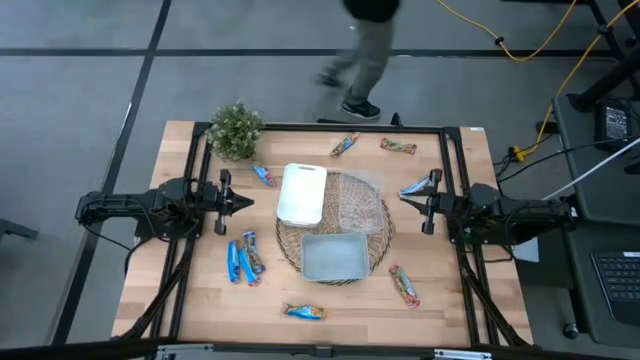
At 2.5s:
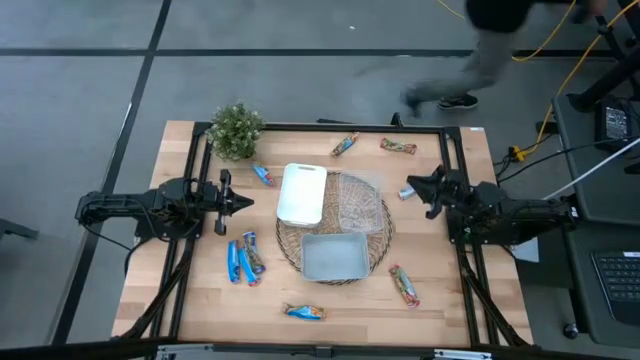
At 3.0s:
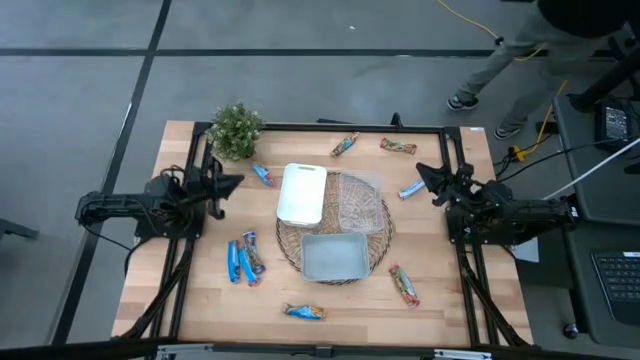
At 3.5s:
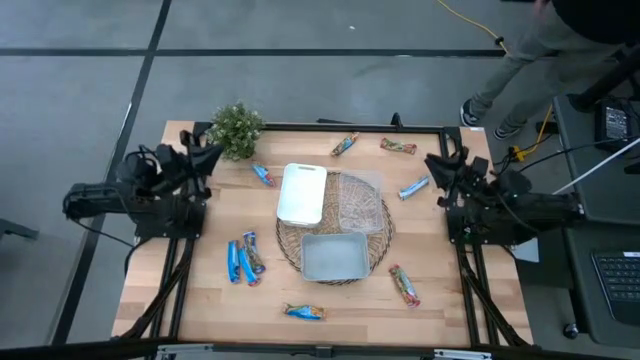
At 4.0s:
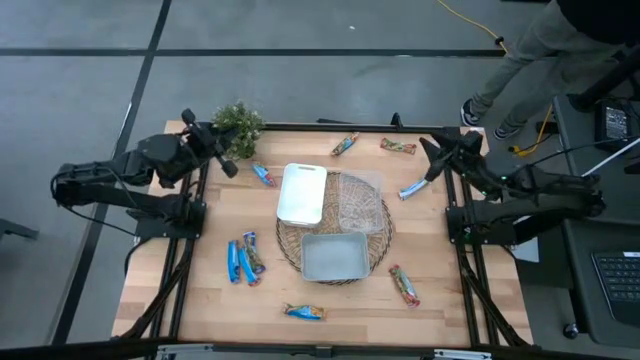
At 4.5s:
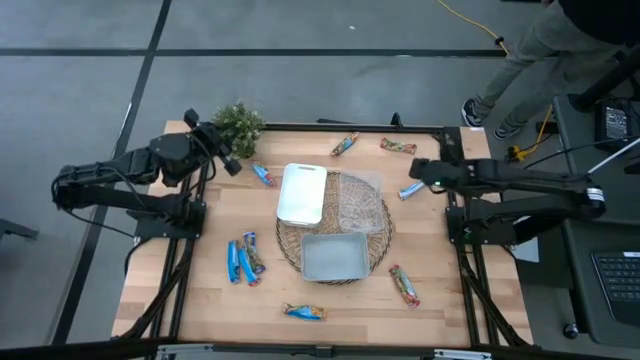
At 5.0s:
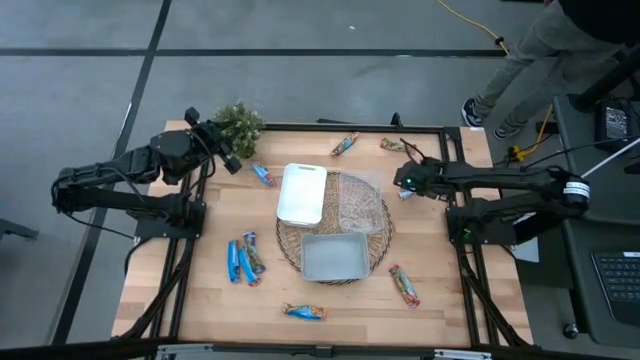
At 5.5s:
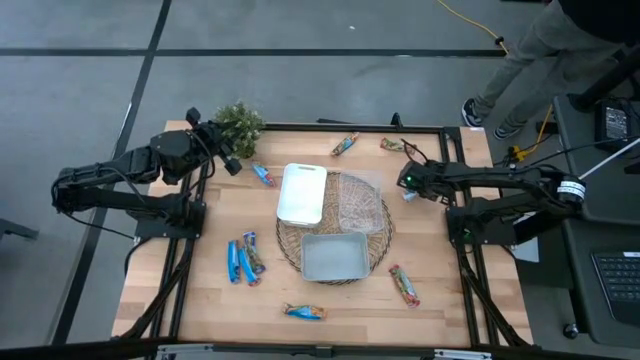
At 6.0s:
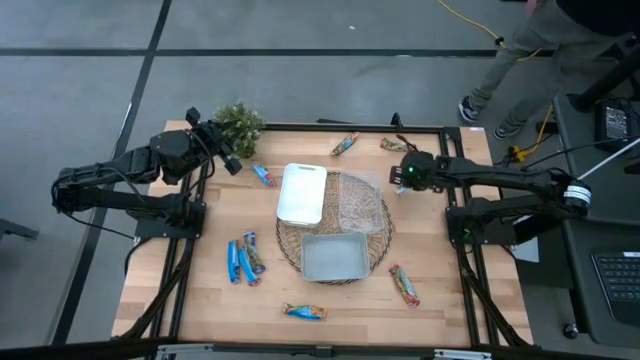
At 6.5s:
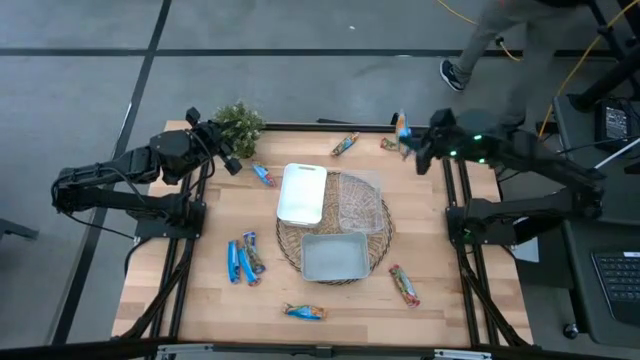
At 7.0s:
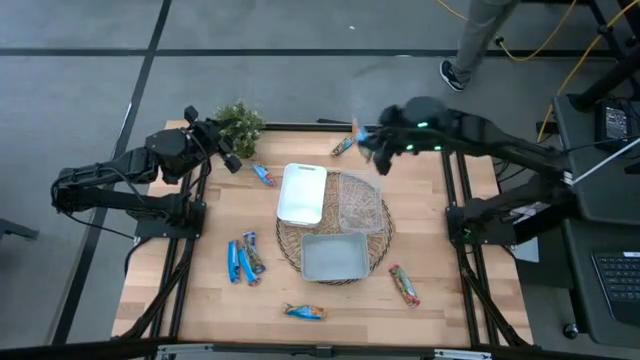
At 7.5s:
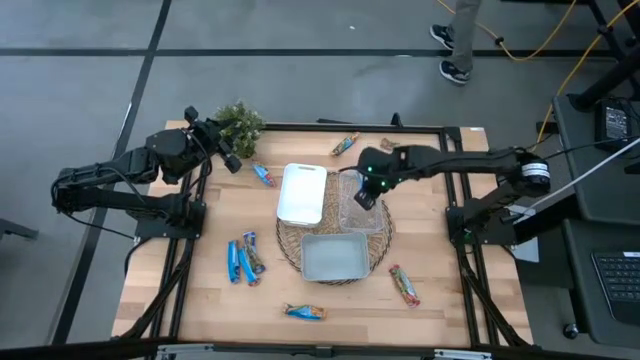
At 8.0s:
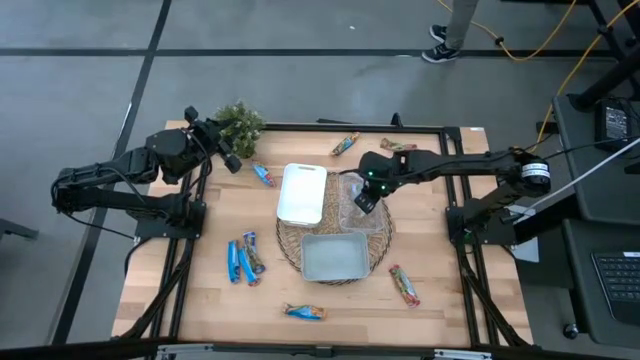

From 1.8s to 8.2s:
Task: Pick and place Granola Bars by type
Put the middle right yellow granola bar into the transparent bin

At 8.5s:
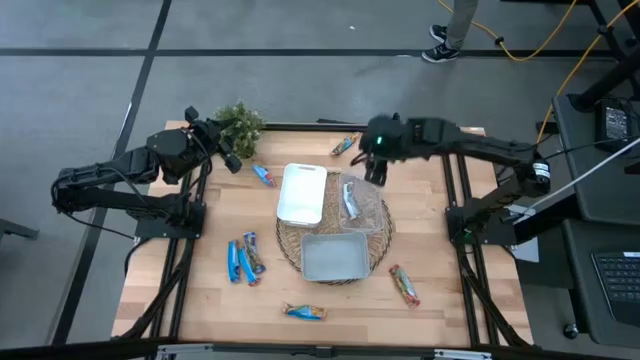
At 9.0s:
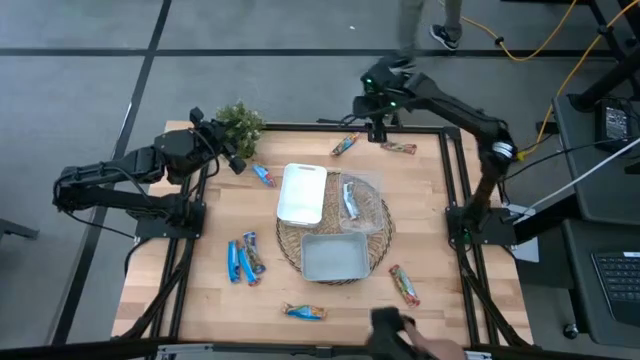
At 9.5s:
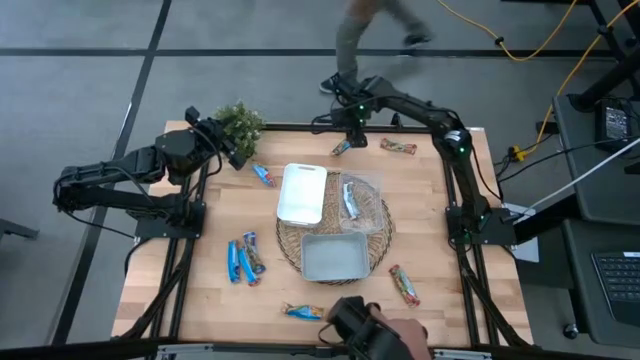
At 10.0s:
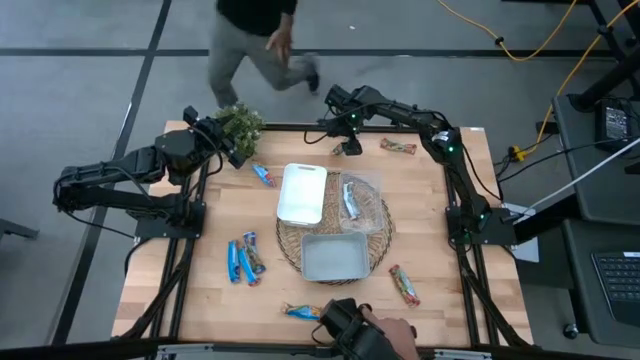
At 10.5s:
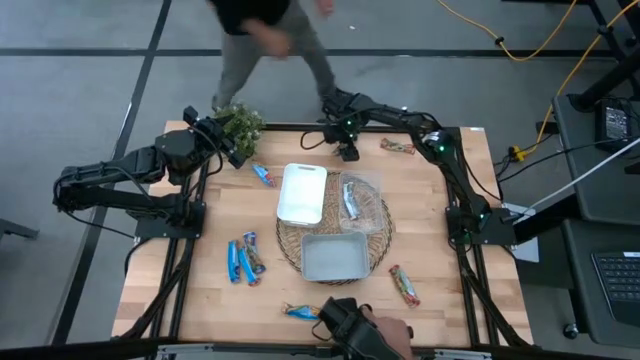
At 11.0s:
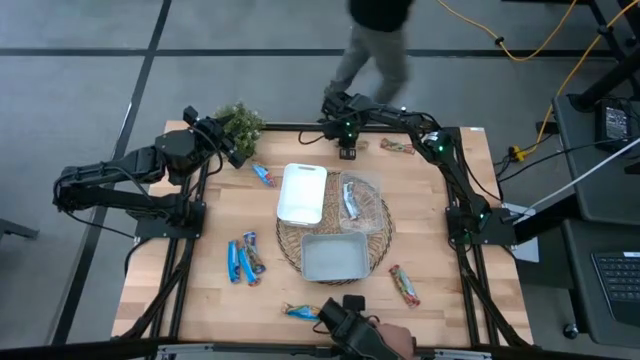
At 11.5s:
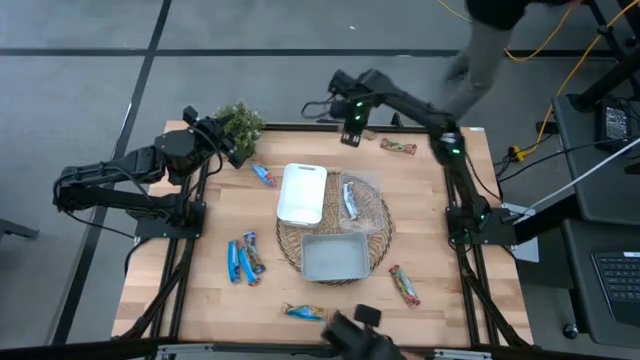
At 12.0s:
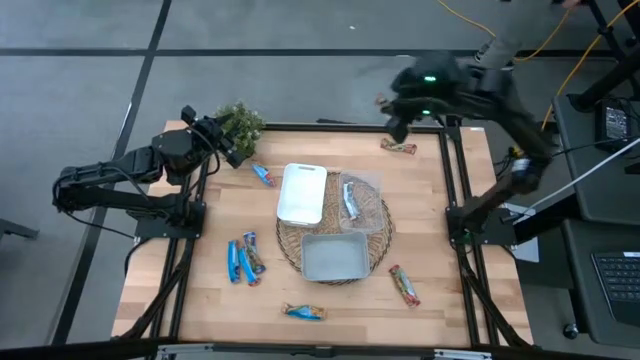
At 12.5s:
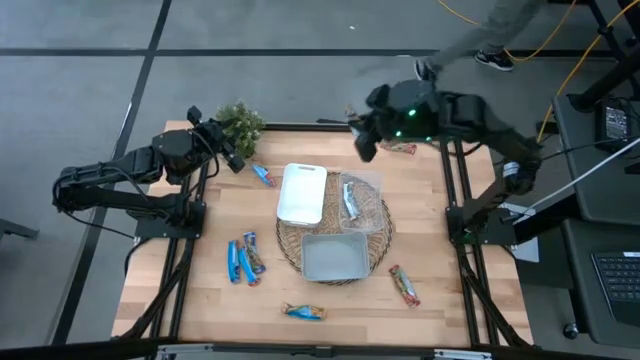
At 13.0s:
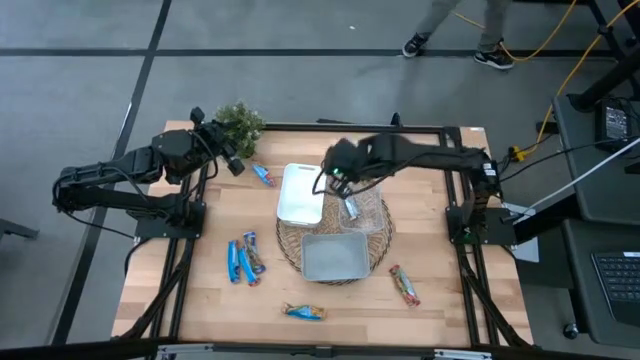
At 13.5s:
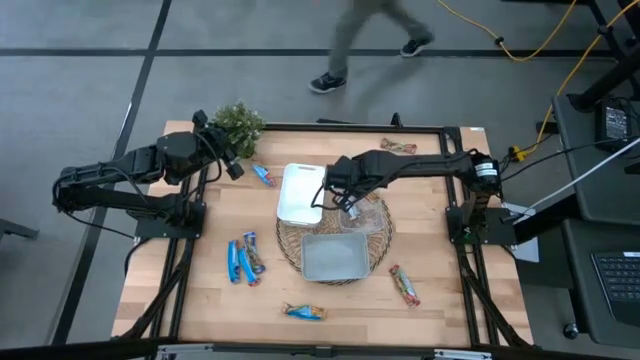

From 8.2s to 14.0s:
Put the top yellow granola bar into the transparent bin

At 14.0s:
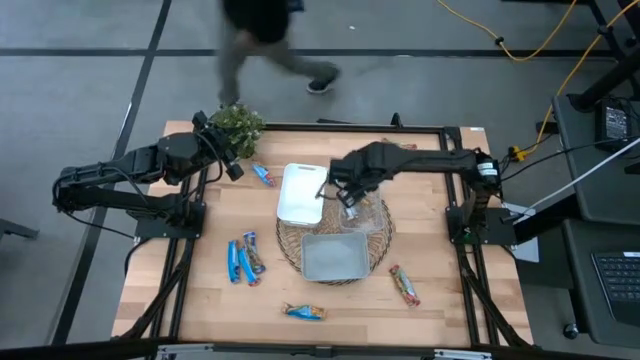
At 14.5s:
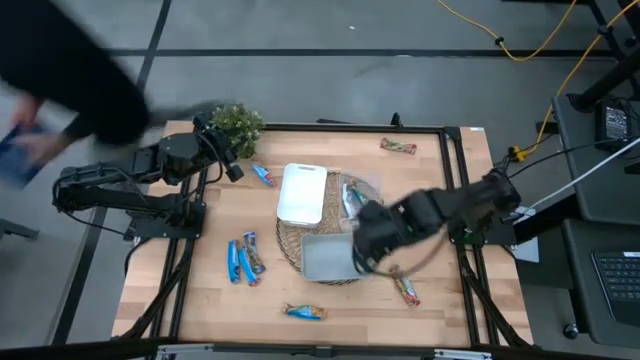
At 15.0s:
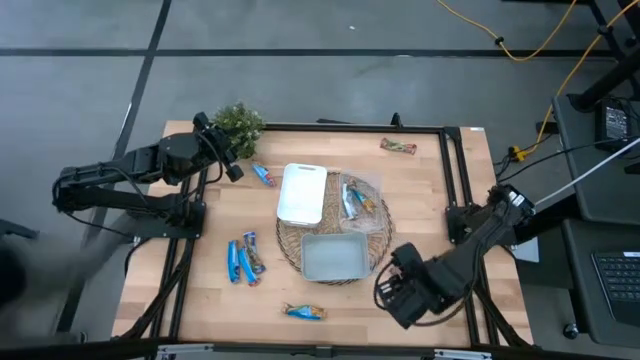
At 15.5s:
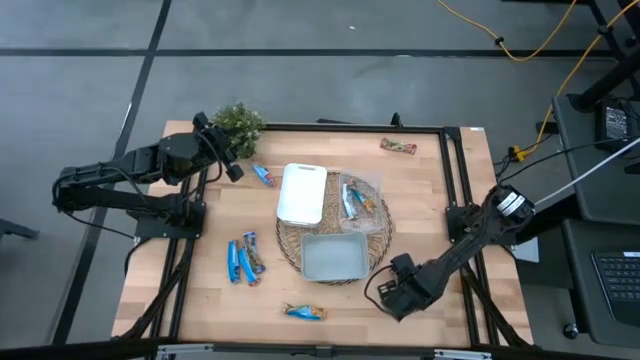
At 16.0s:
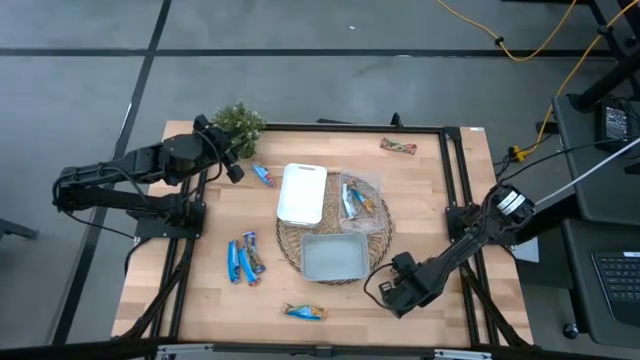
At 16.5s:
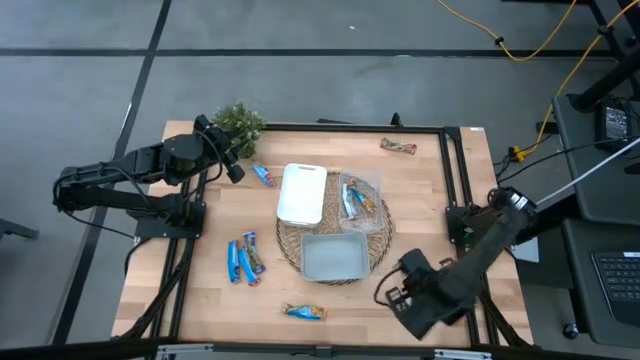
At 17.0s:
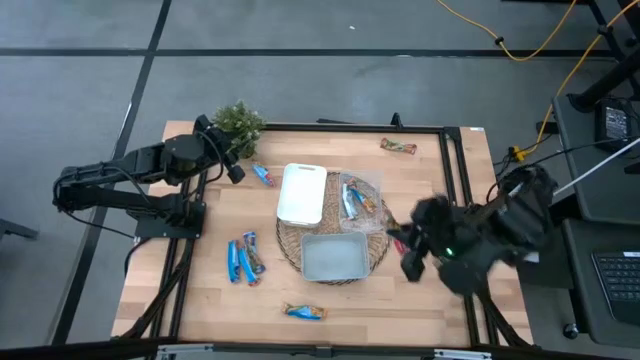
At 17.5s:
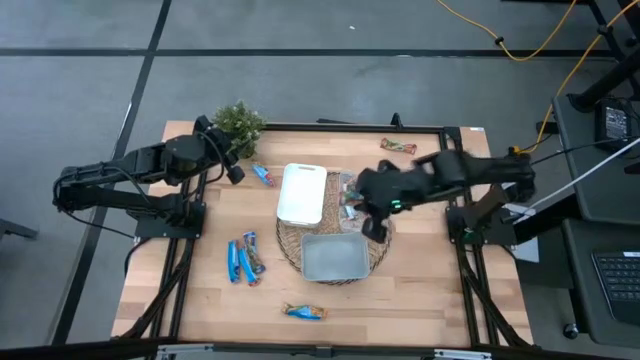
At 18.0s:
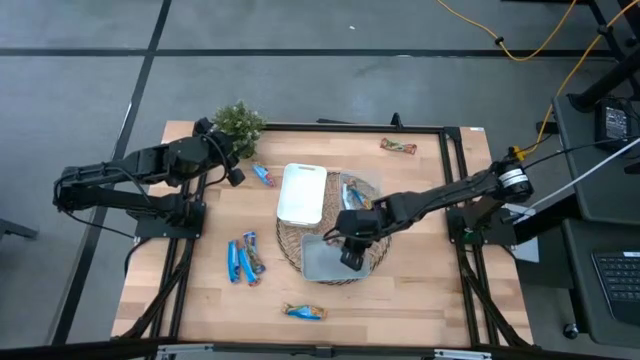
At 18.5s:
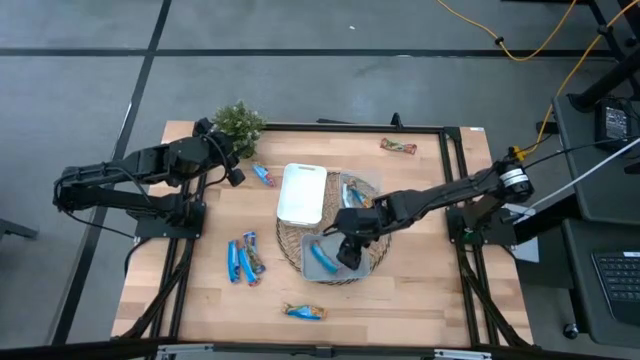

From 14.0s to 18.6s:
Put the bottom right red granola bar into the gray bin

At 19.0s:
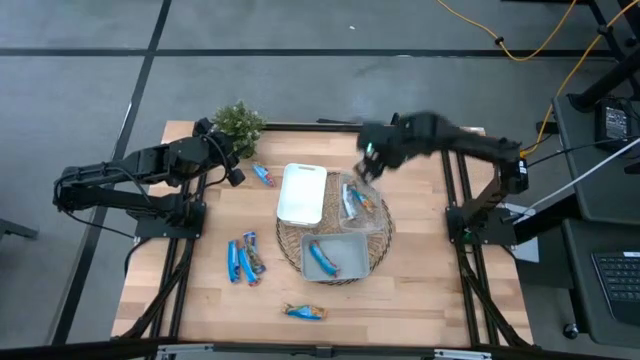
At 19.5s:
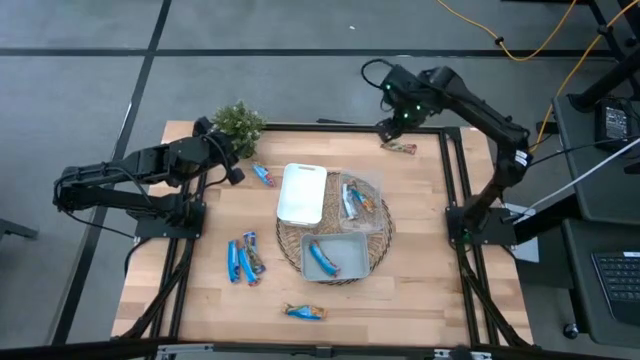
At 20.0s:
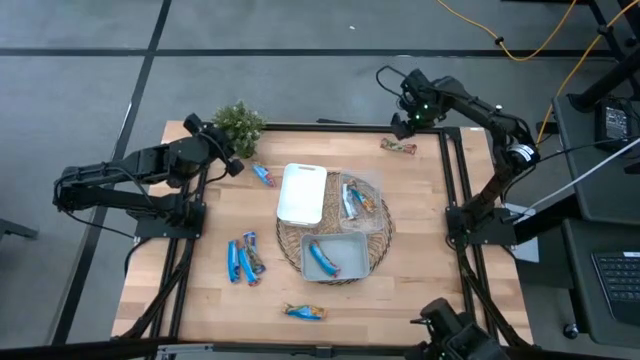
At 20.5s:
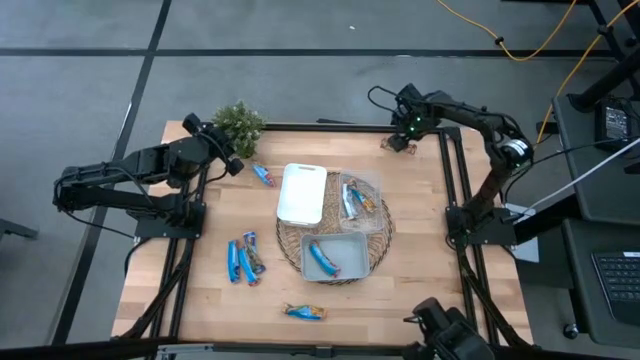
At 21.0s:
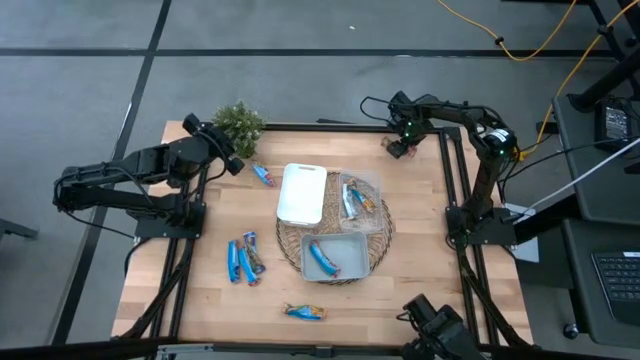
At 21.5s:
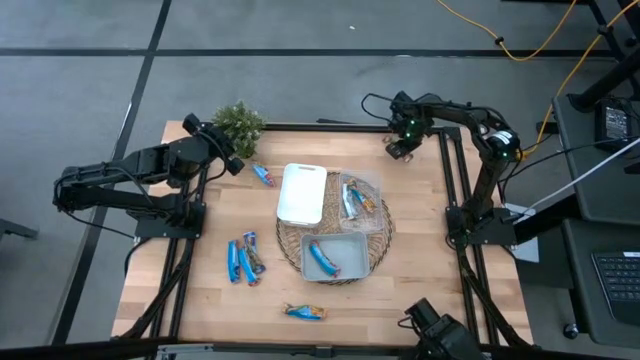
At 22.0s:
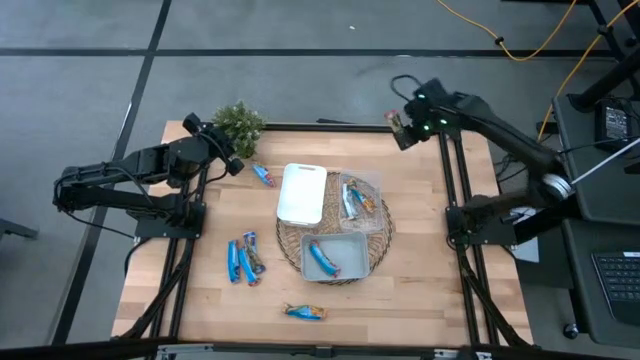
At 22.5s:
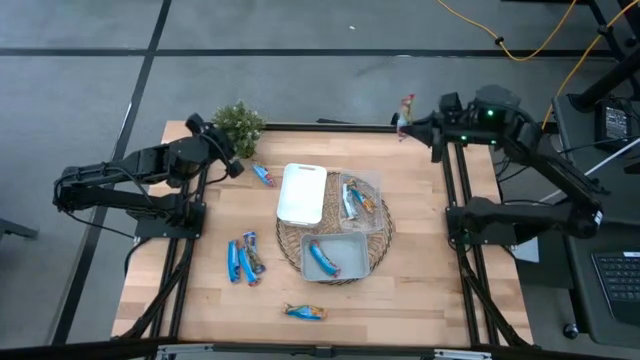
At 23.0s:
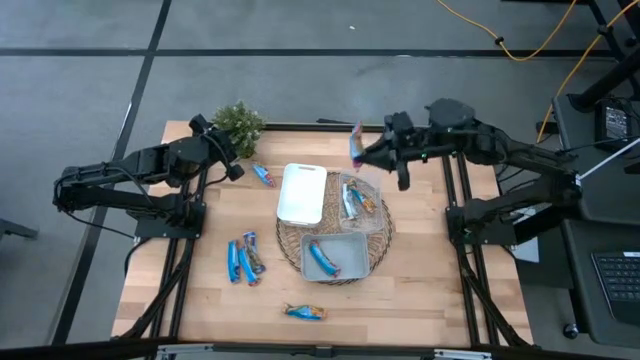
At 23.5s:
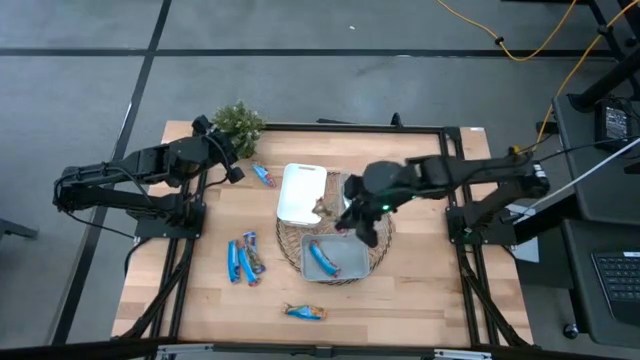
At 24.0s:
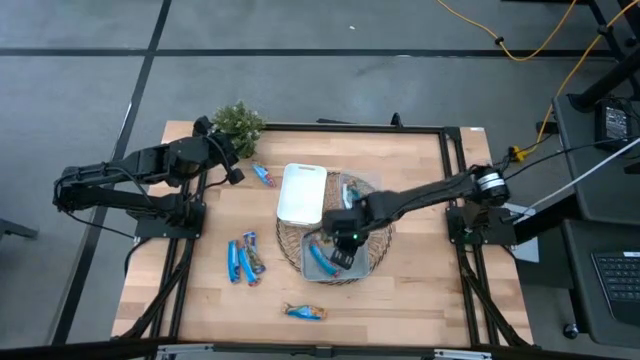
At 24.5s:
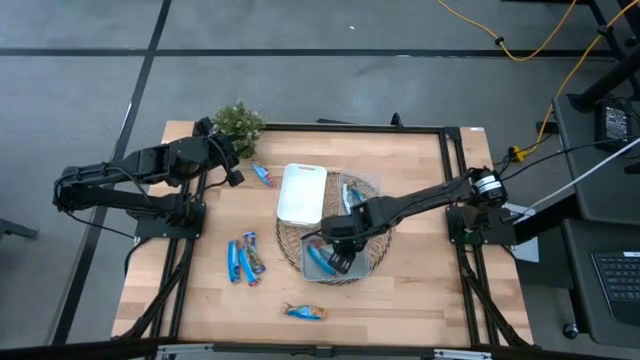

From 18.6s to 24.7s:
Put the top right red granola bar into the gray bin
